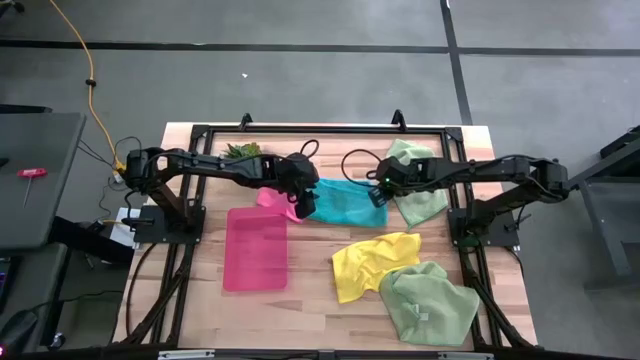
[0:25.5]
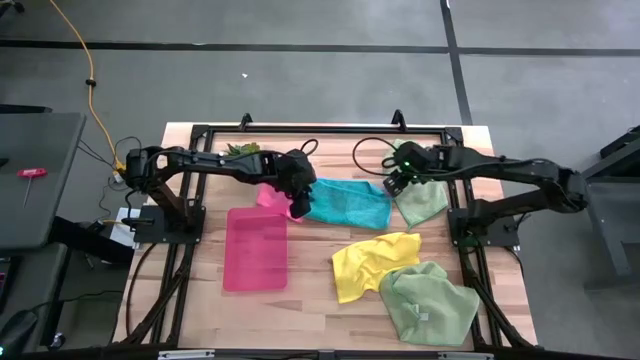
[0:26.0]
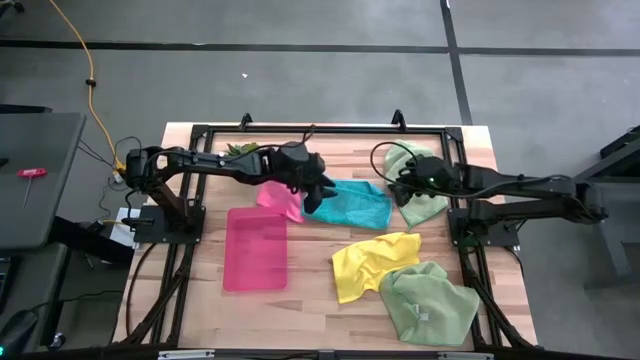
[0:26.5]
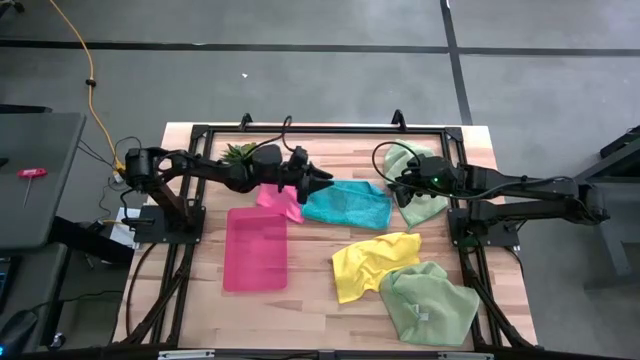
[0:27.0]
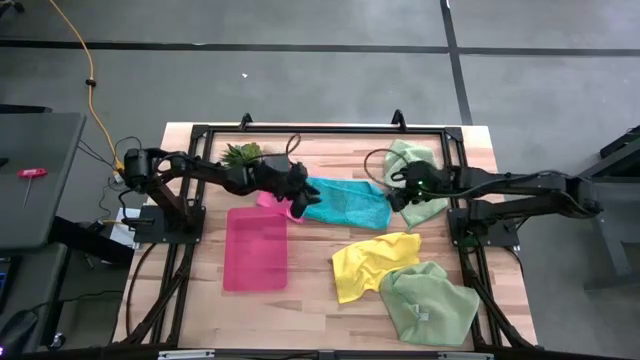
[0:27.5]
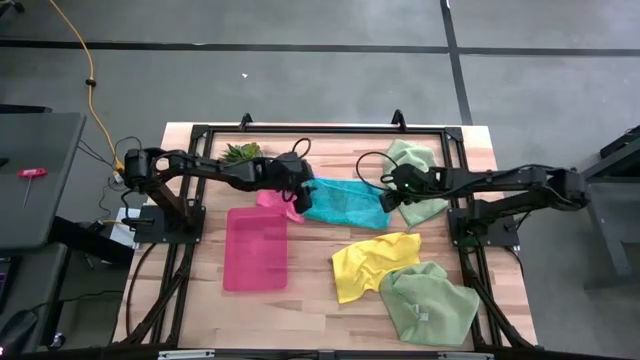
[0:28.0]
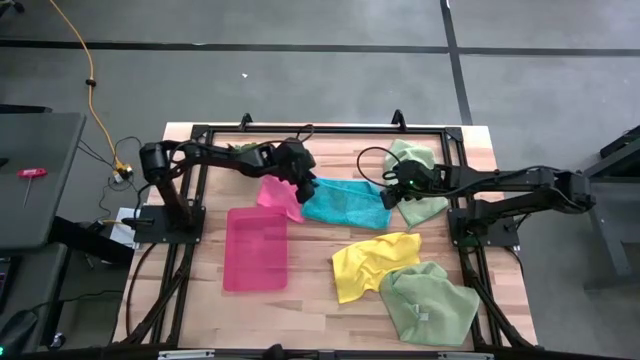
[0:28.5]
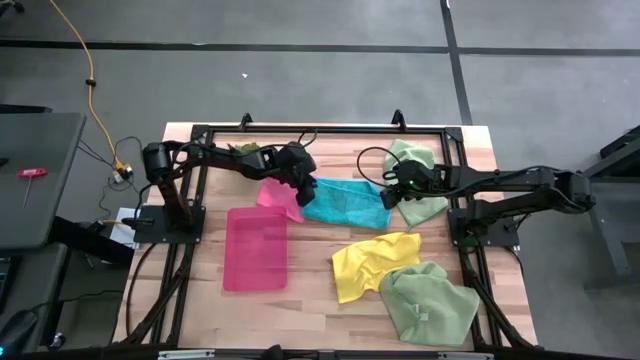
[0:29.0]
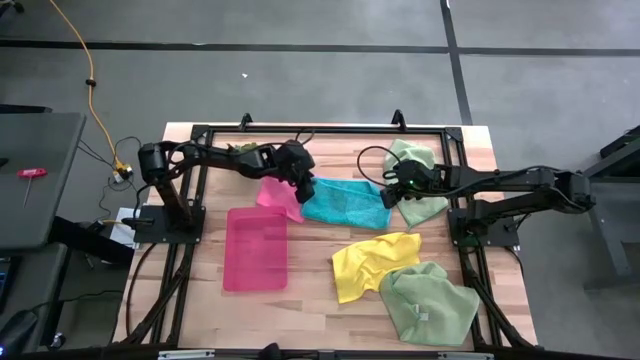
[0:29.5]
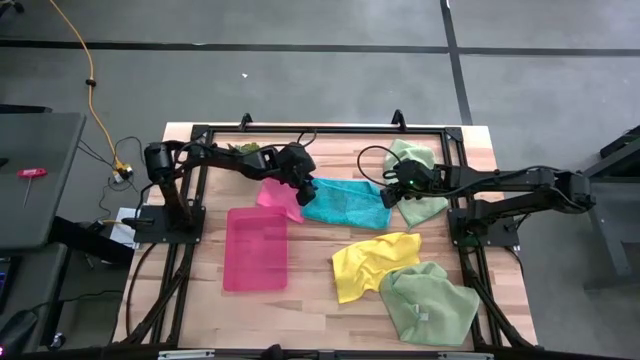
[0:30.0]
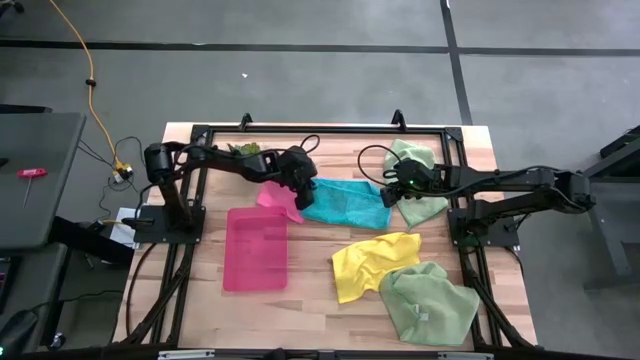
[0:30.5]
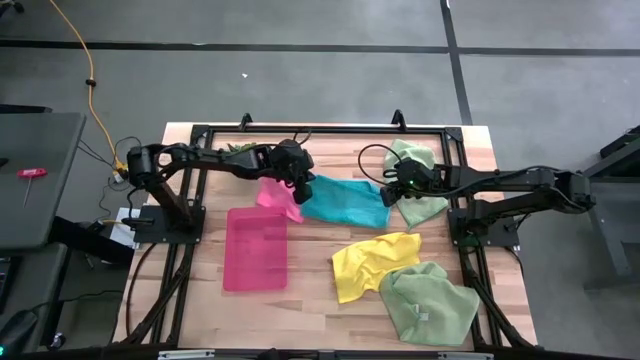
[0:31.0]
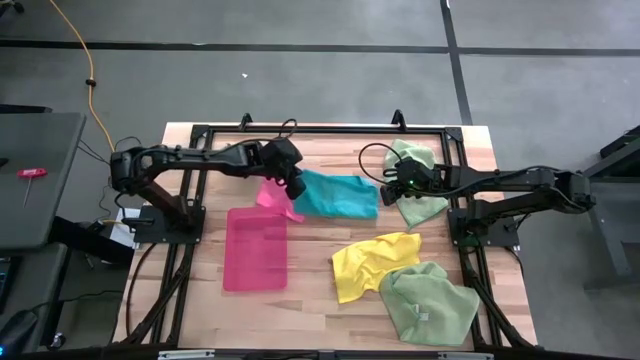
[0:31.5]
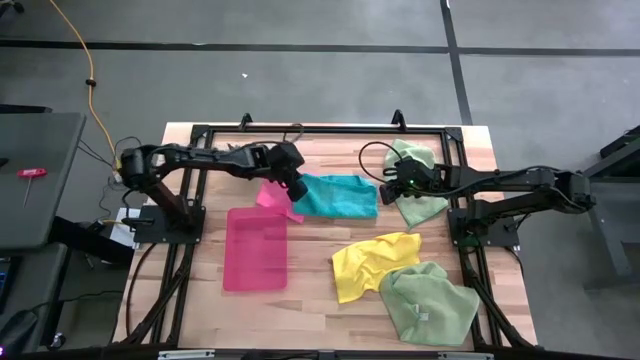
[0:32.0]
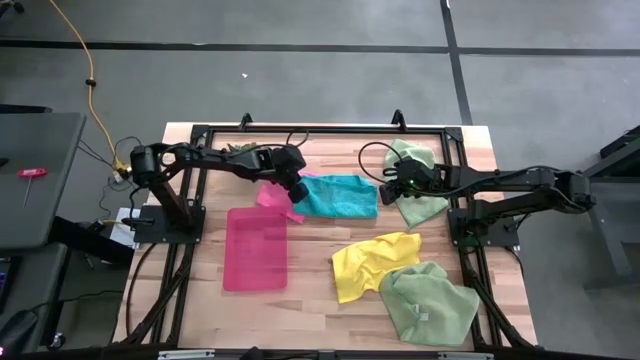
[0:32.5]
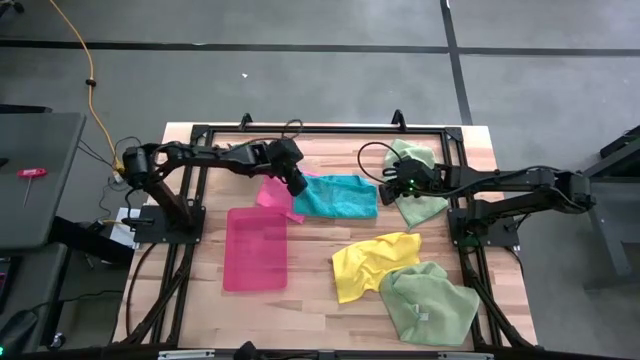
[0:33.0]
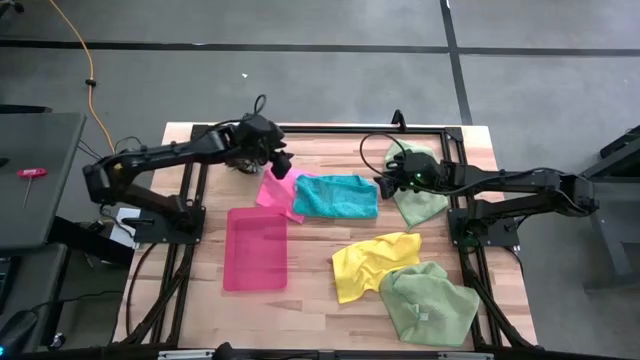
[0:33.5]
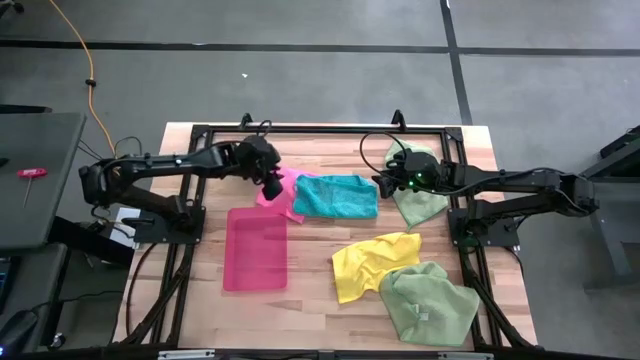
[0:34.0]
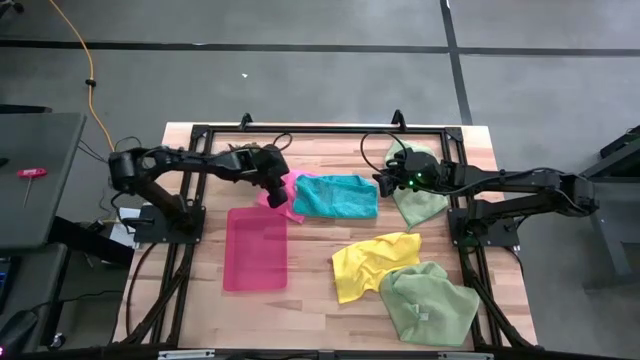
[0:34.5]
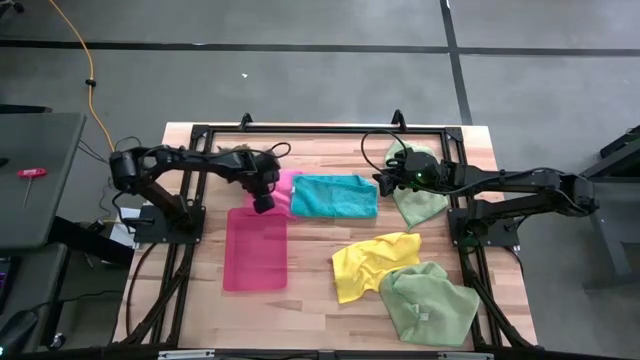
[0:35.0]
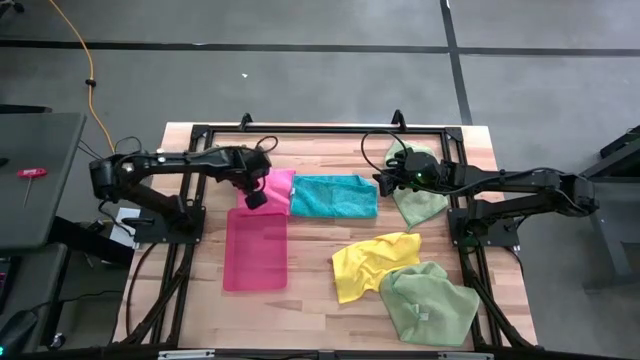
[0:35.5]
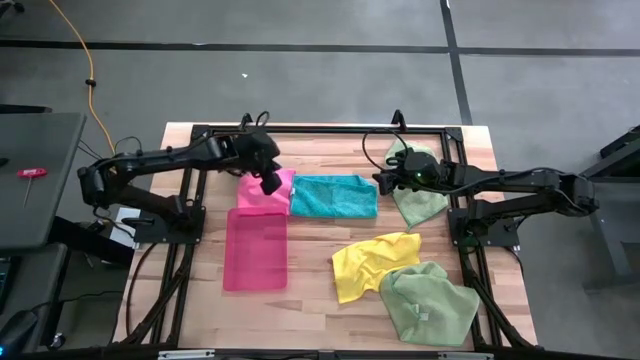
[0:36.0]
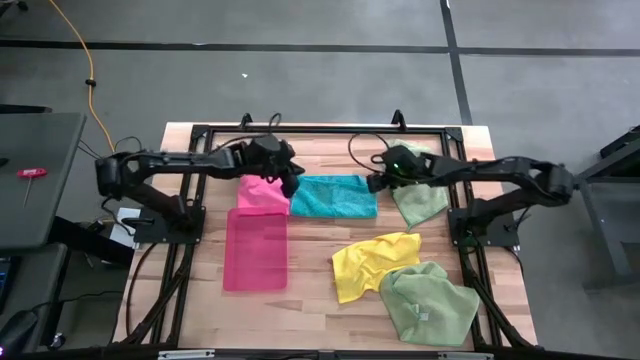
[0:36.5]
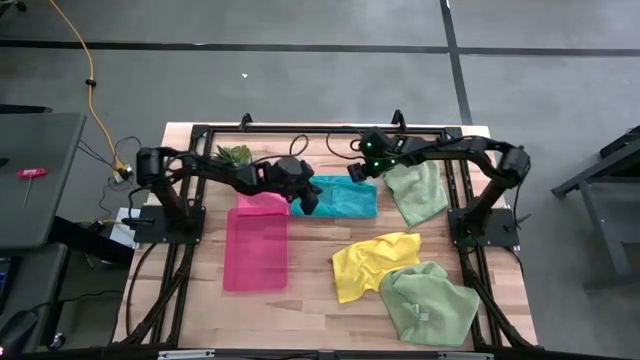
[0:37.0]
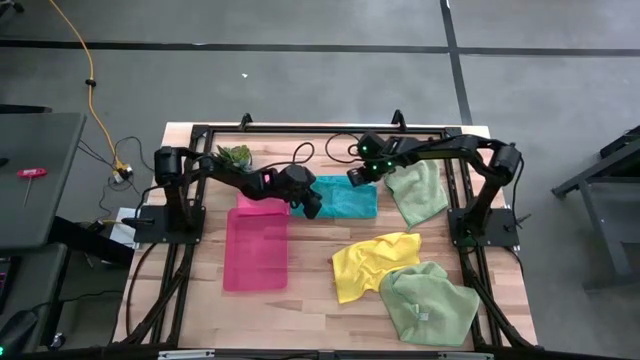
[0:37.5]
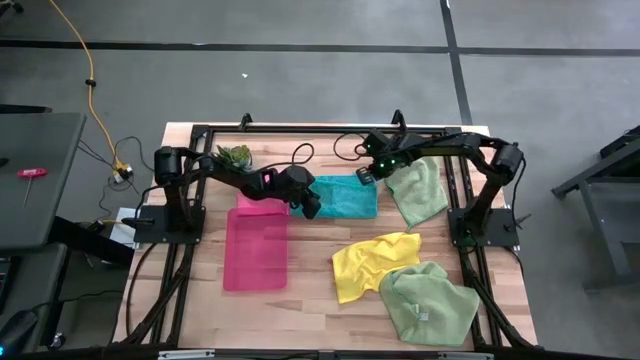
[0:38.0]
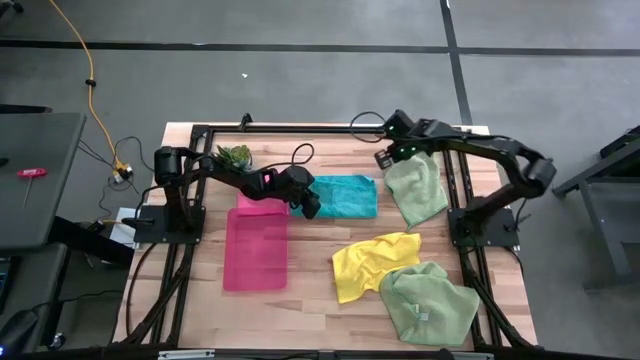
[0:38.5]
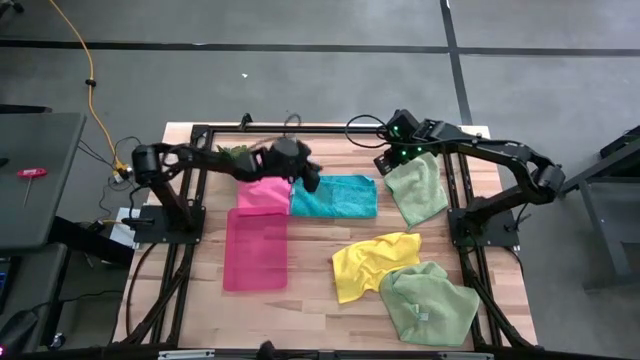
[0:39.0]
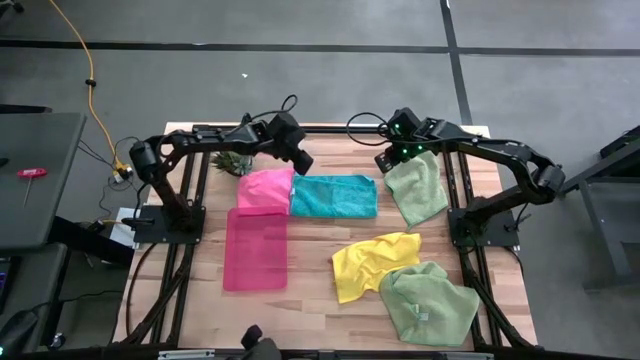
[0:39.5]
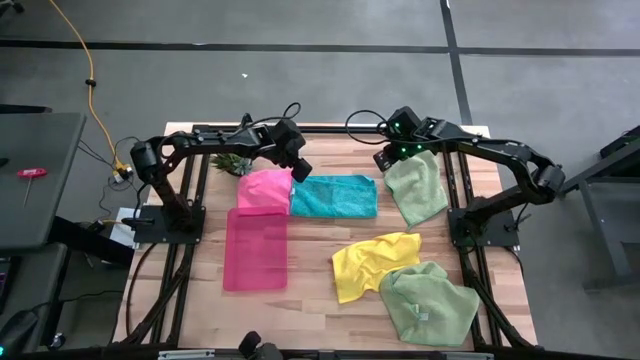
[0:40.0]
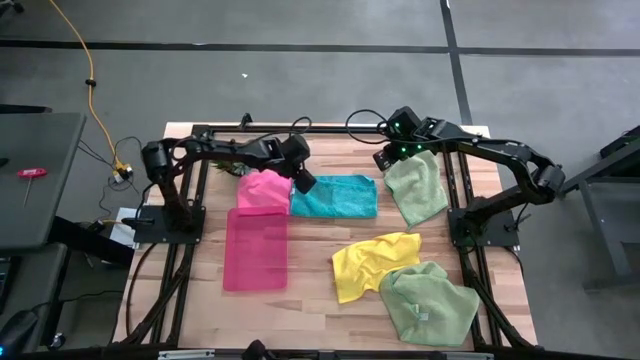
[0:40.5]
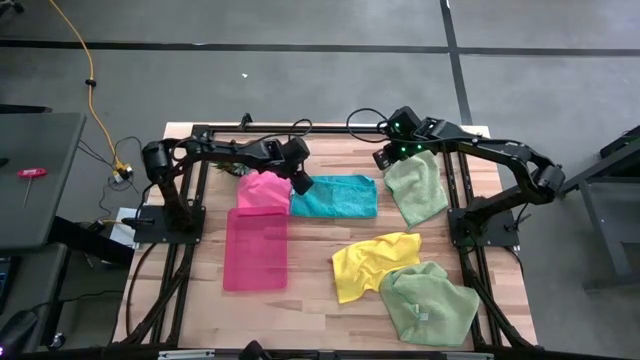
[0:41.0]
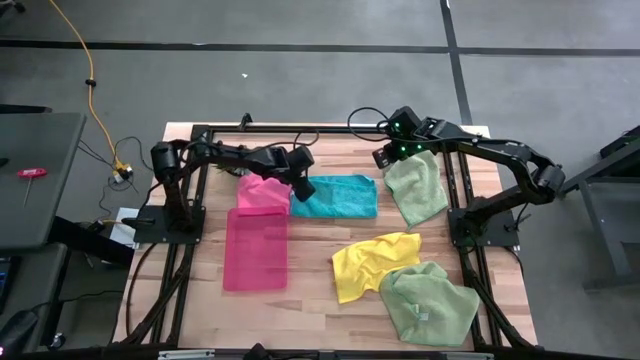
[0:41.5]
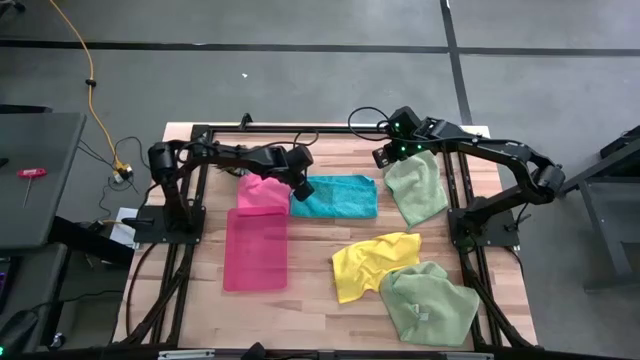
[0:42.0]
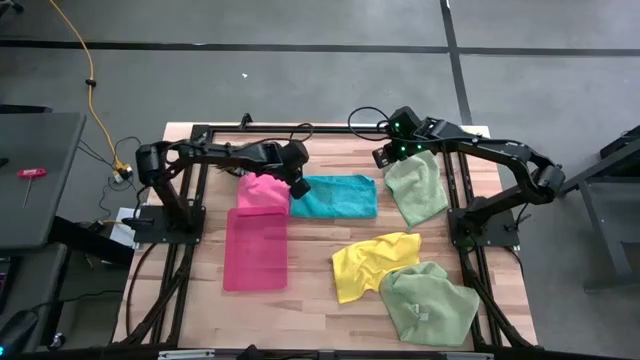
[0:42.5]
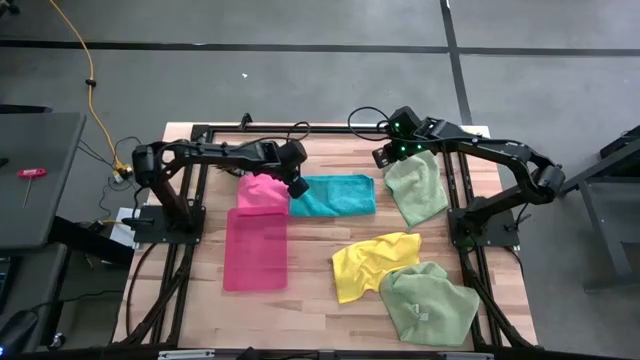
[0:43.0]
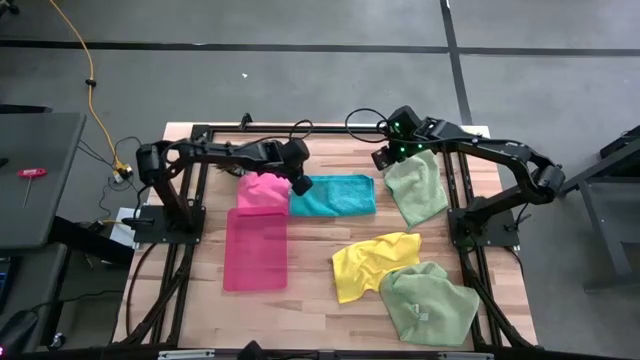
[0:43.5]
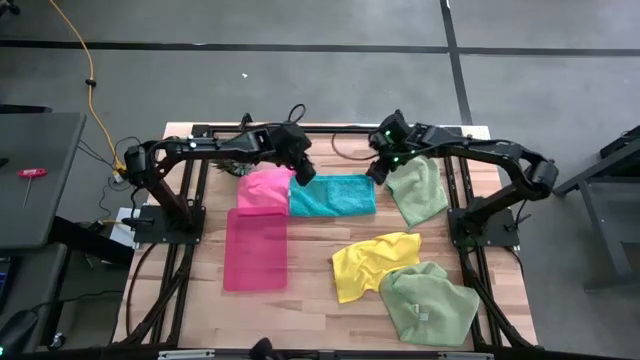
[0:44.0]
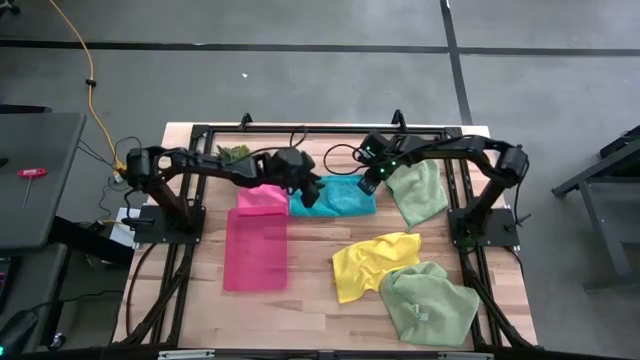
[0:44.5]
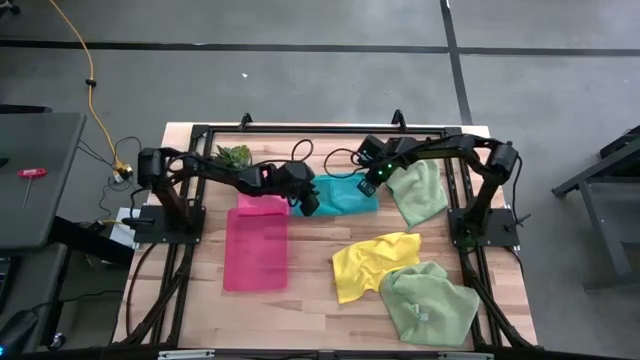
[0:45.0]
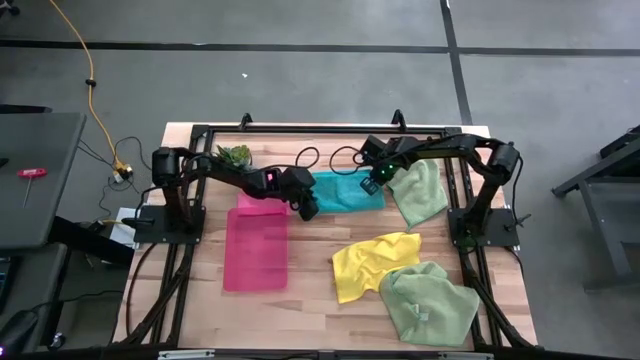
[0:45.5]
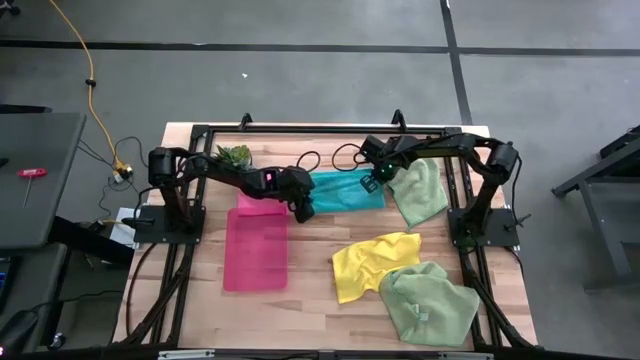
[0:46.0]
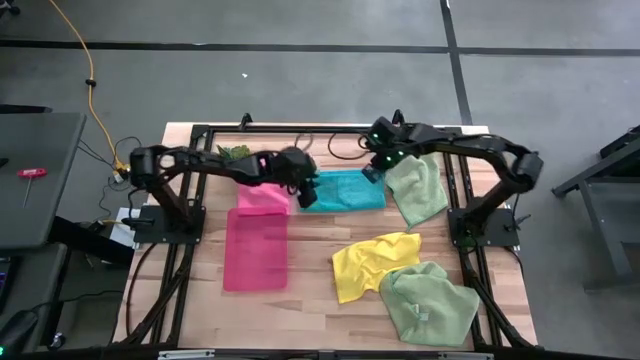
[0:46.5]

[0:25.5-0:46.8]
Task: Fold microfiber towels
Fold the blue microfiber towel
